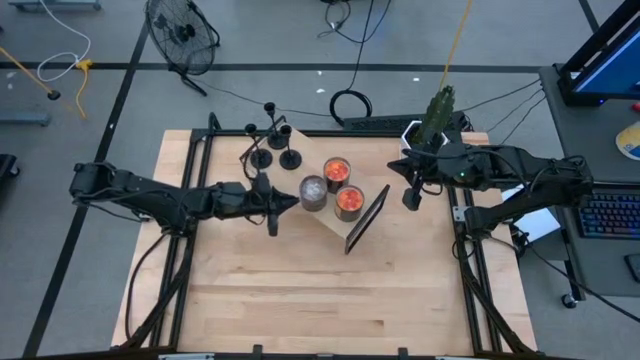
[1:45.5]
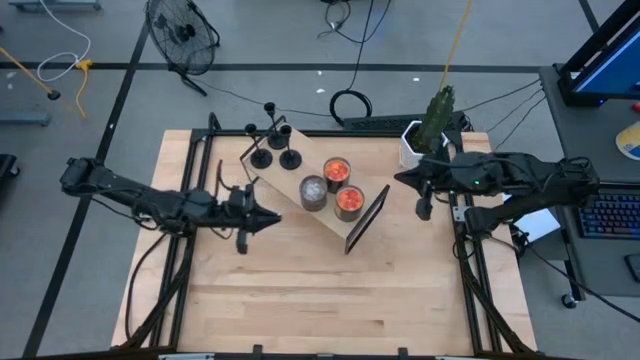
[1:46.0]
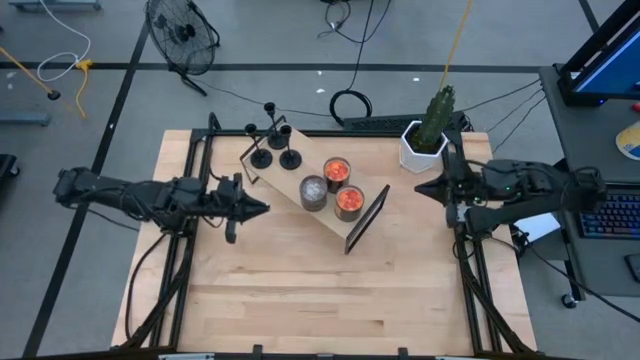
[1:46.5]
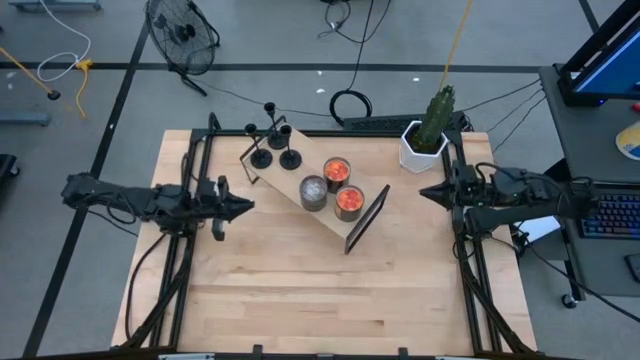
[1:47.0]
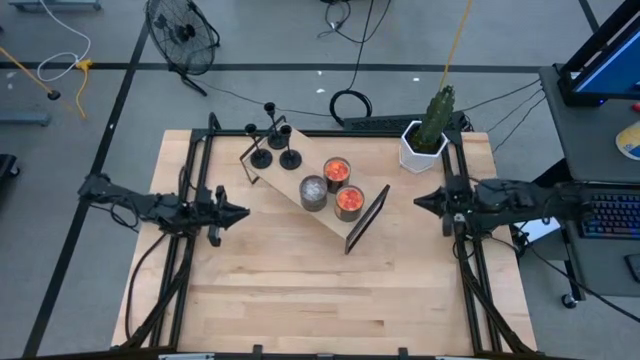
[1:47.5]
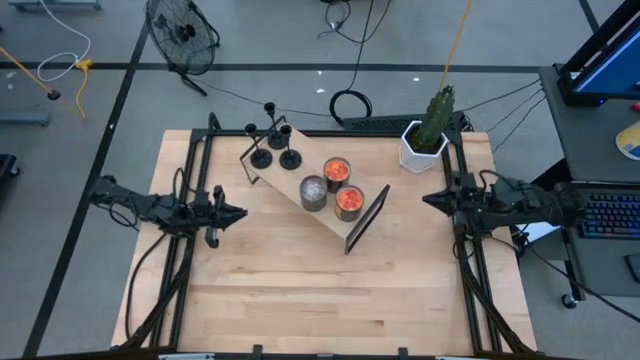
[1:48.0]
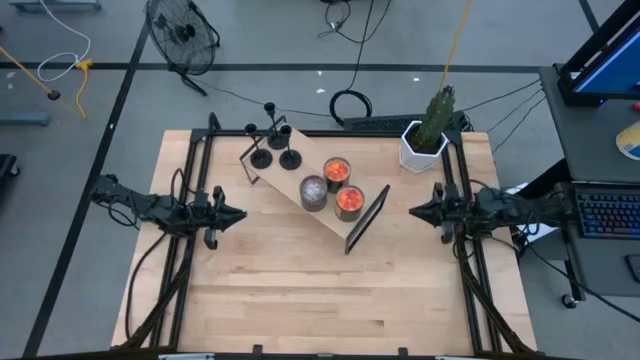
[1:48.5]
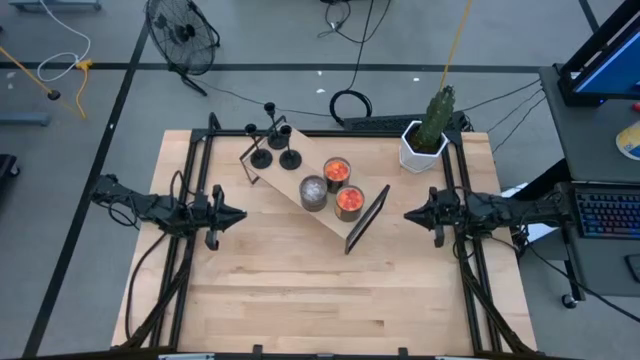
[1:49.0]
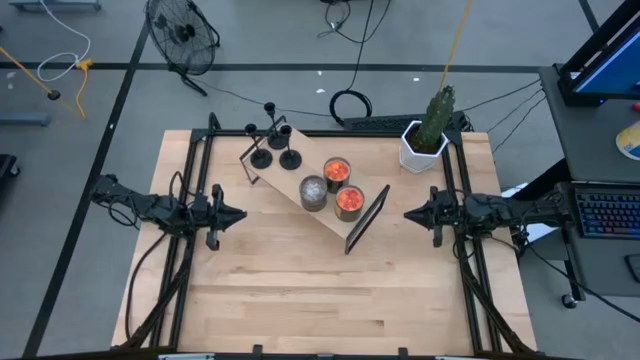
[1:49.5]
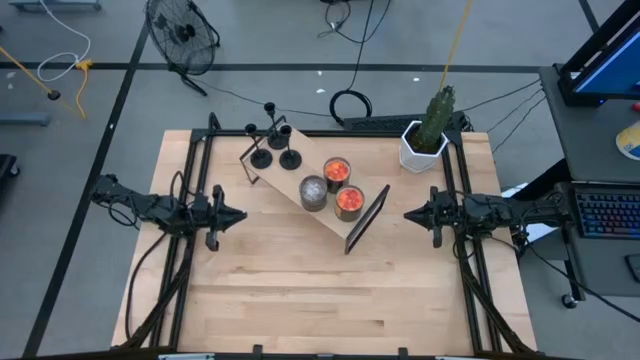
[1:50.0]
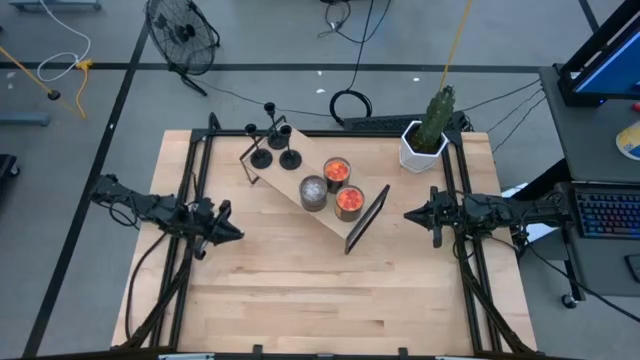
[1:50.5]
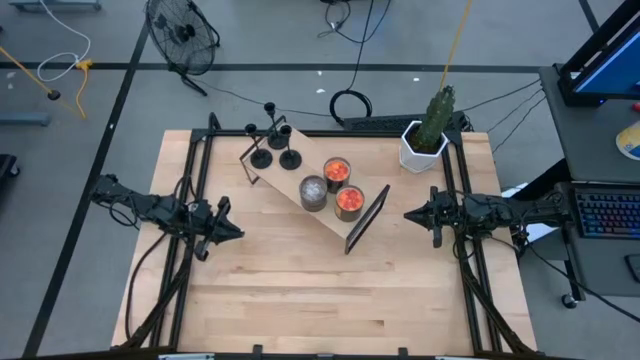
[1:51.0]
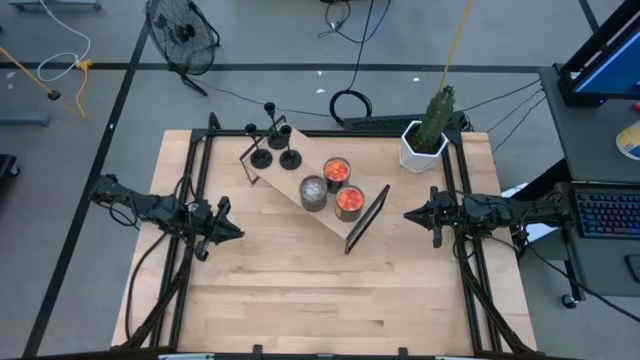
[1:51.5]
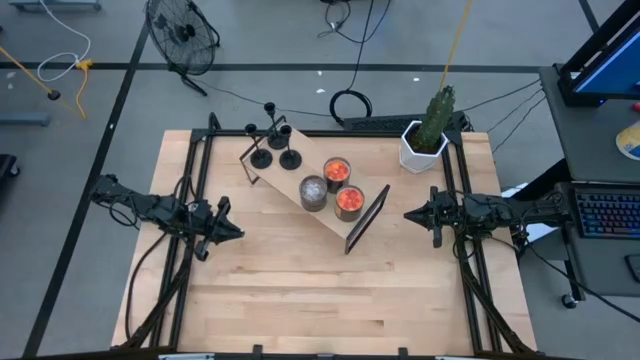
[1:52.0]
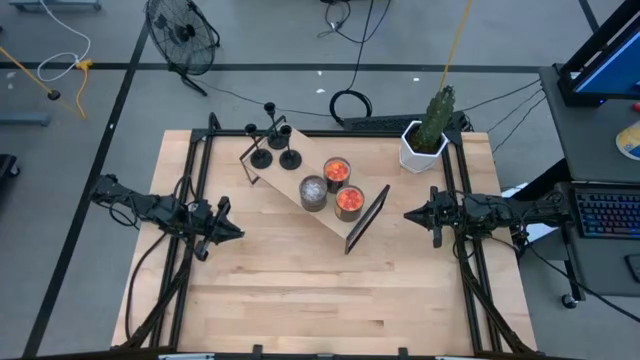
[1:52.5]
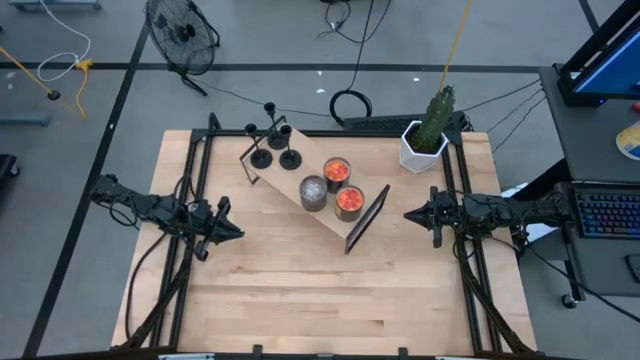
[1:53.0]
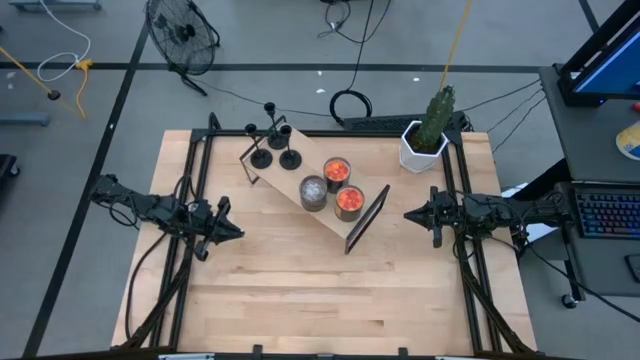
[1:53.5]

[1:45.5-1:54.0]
Task: Pick & Place candle stick holders
Return to Home Position

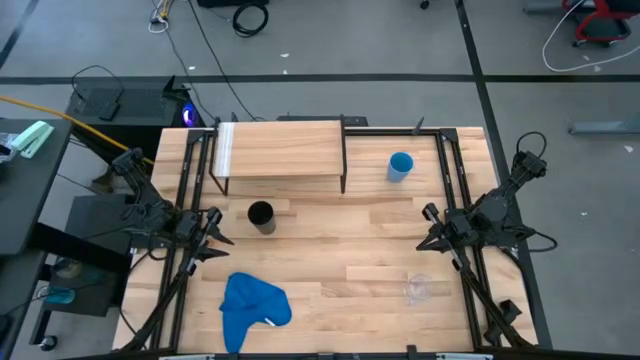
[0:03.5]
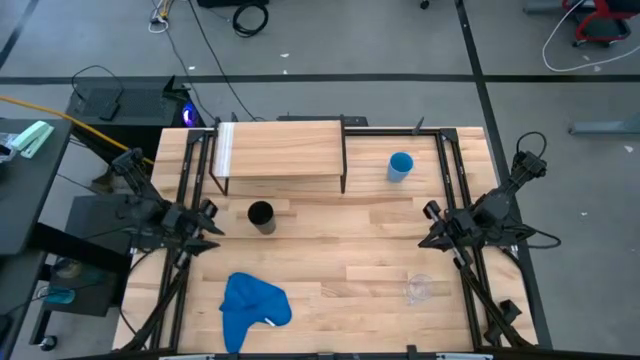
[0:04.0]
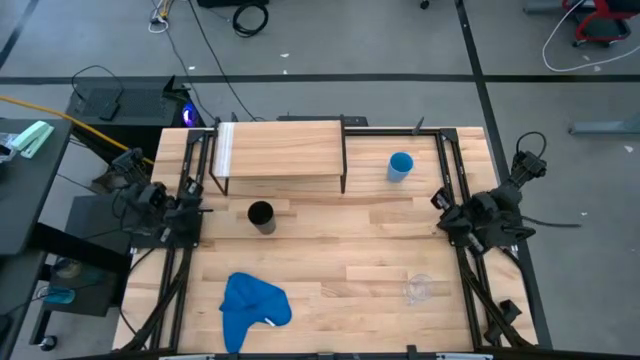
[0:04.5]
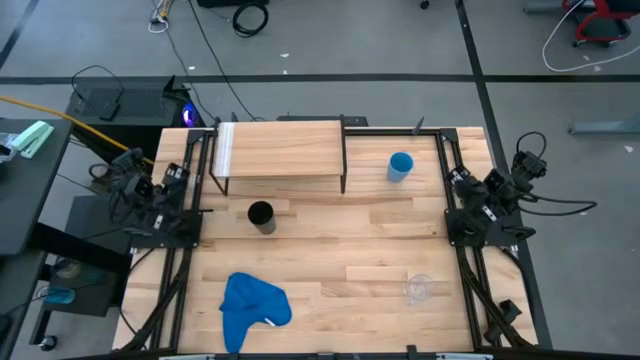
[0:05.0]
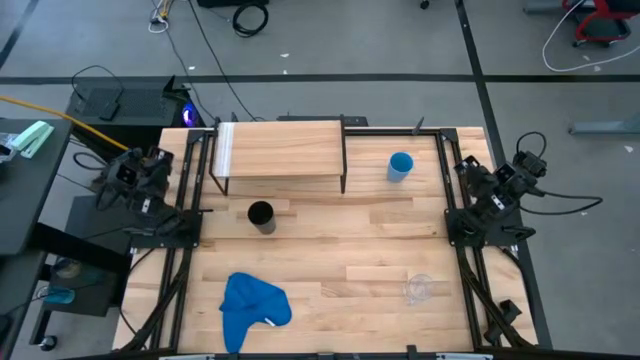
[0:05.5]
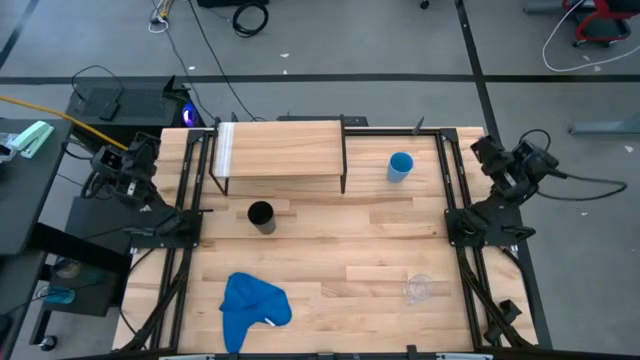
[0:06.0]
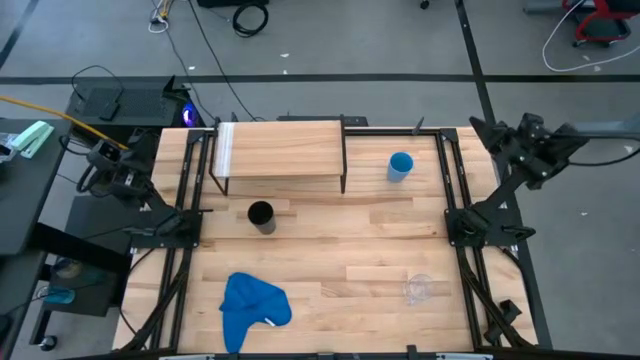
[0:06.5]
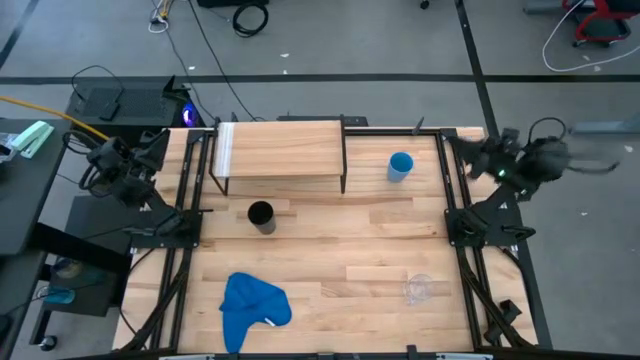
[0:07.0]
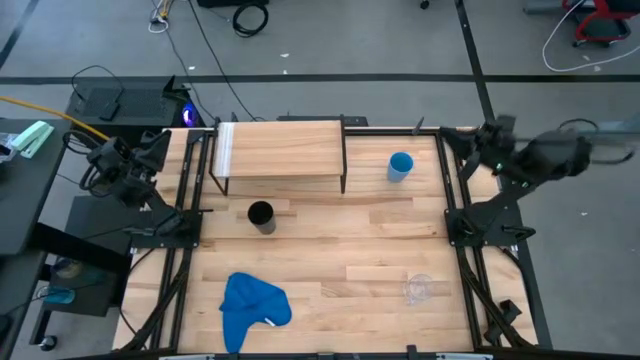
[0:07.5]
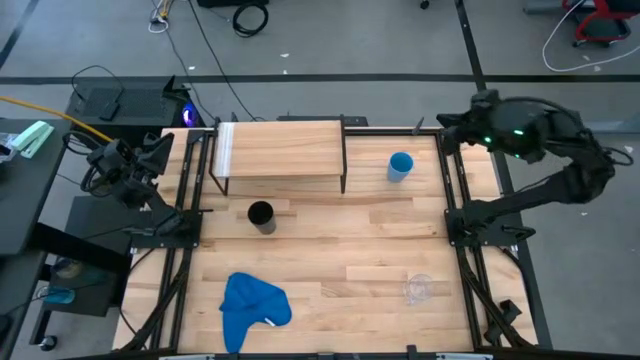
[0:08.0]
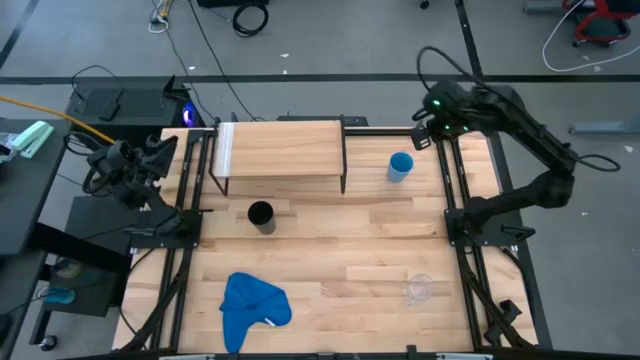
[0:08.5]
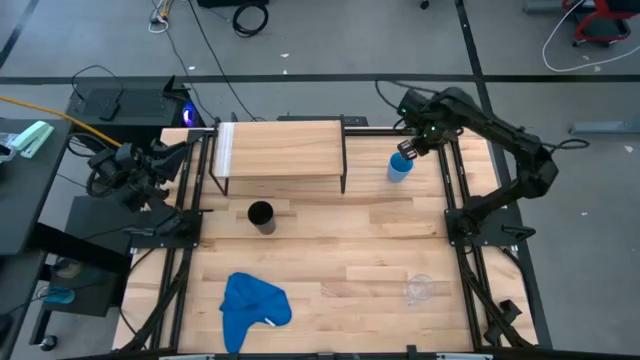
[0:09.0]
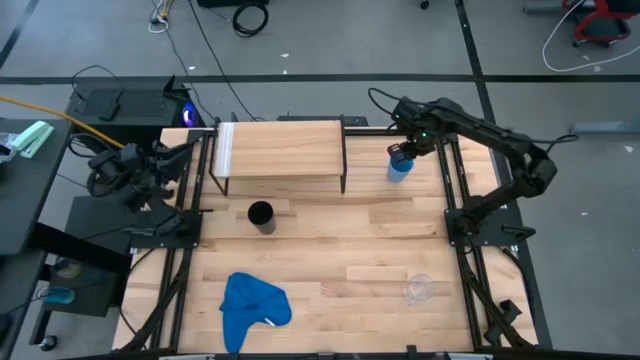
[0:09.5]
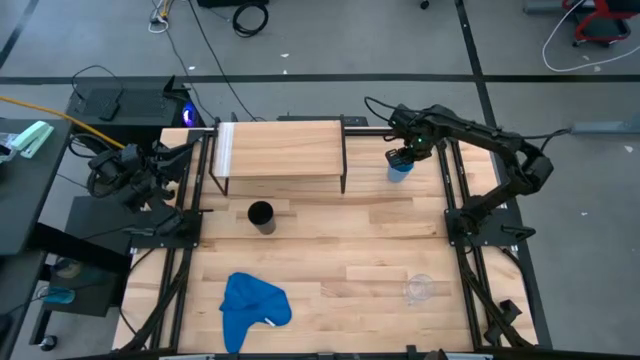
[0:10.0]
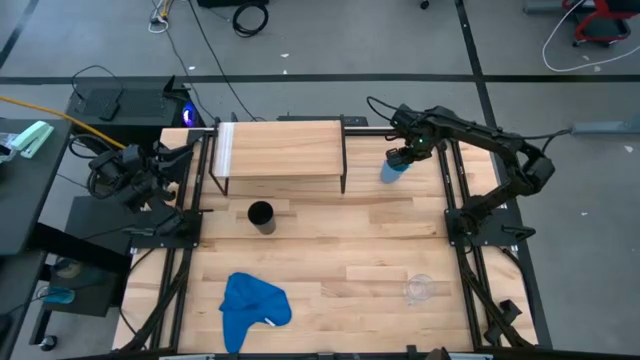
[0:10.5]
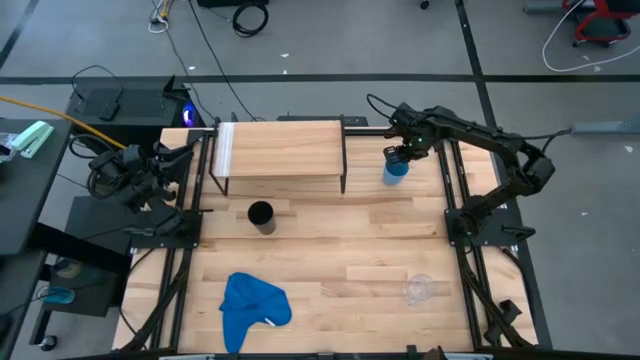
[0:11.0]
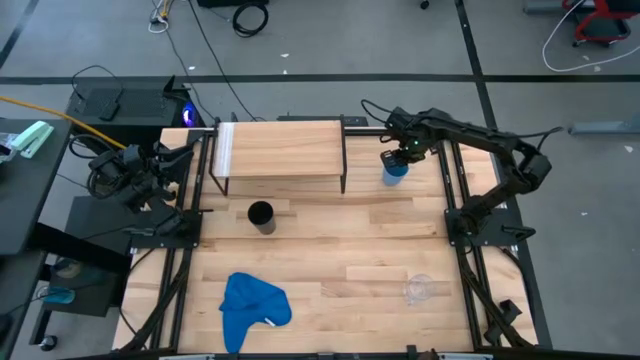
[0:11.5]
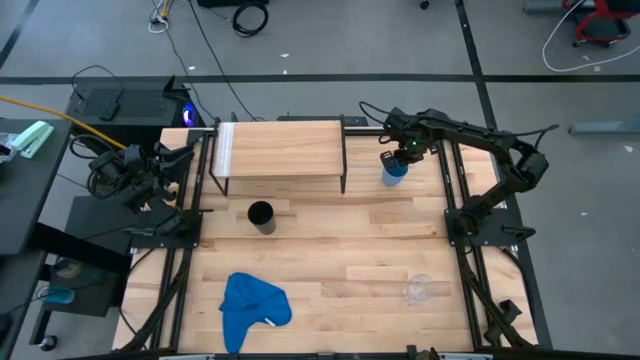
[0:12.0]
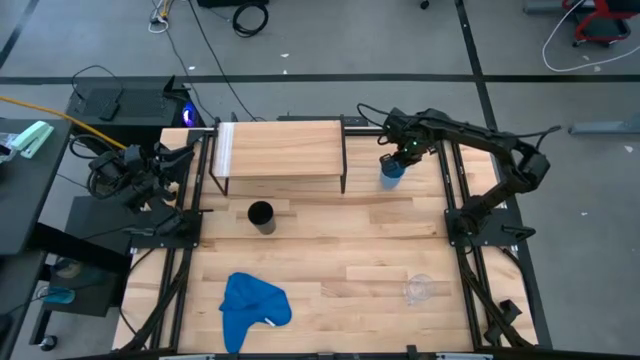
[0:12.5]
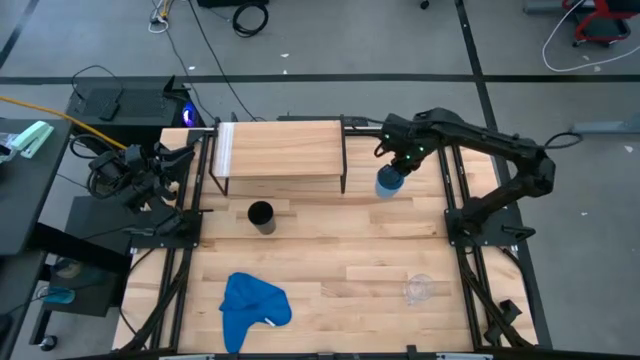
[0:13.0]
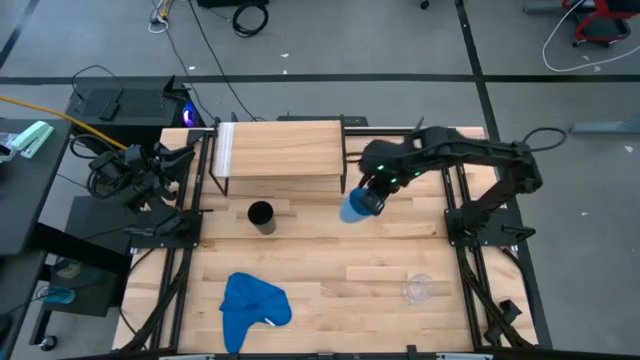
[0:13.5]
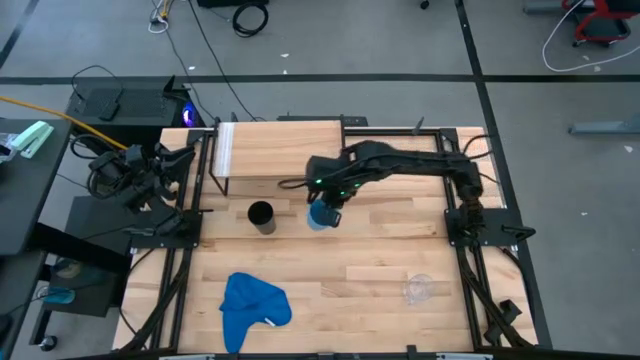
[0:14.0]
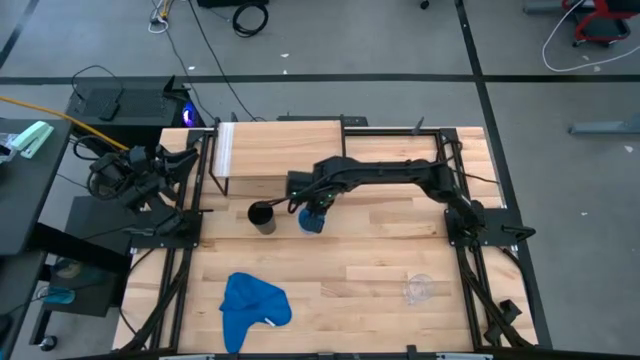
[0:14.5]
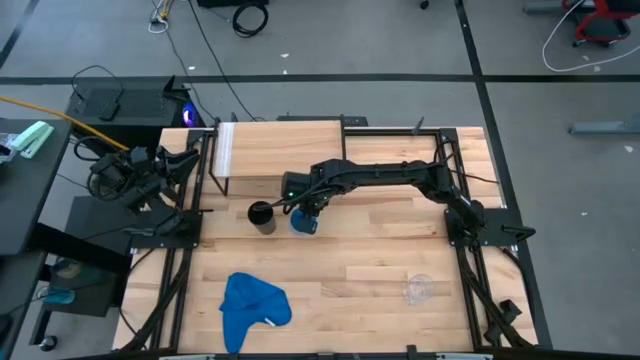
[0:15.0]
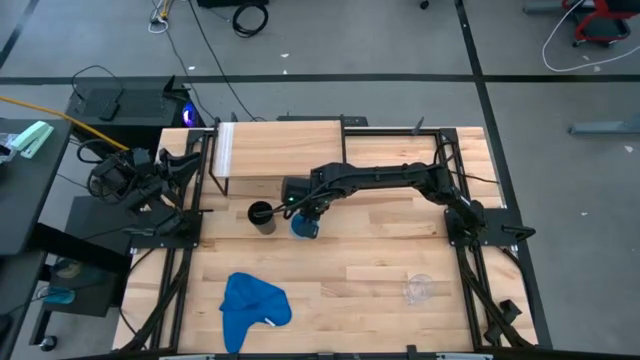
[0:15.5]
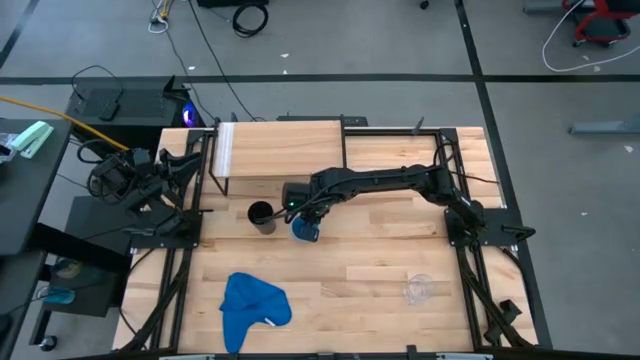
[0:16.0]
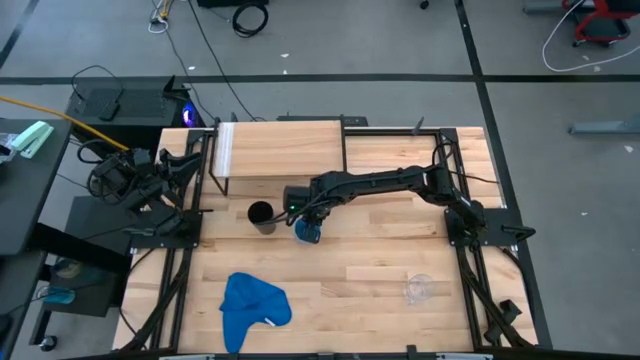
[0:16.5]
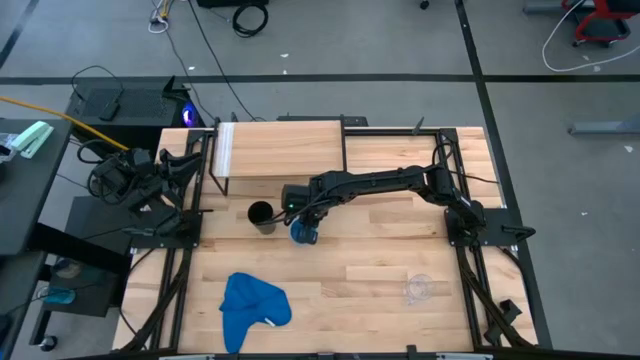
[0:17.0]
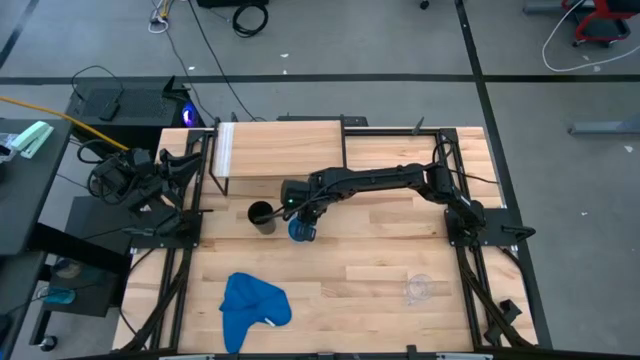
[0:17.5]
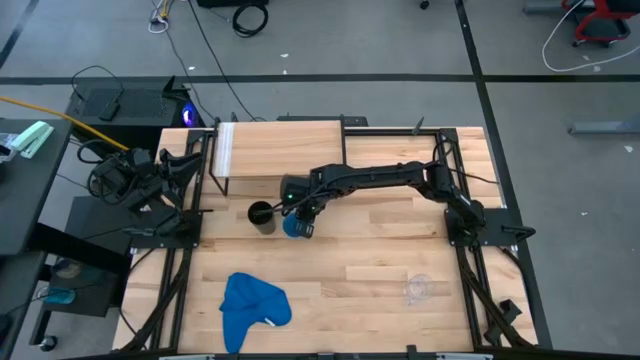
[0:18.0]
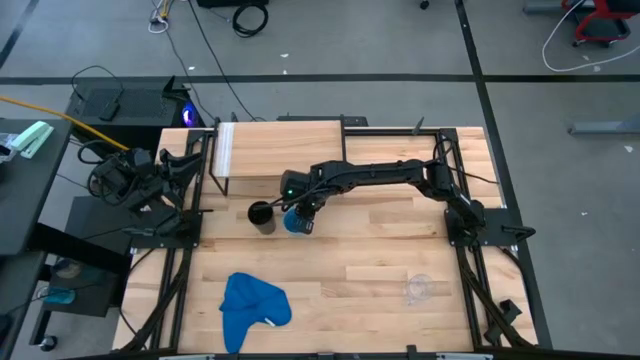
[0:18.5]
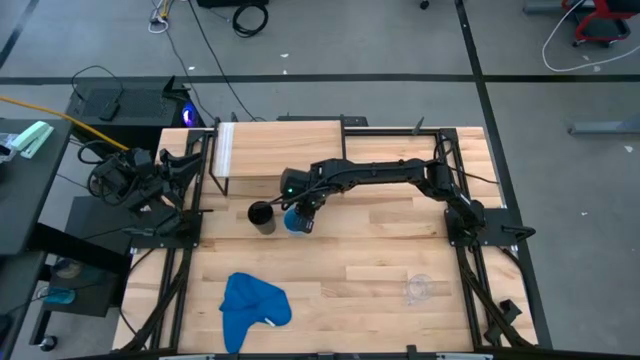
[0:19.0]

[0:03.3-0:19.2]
Task: Stack small to large cups/mugs on shelf
Move the blue cup to the right of the black cup
